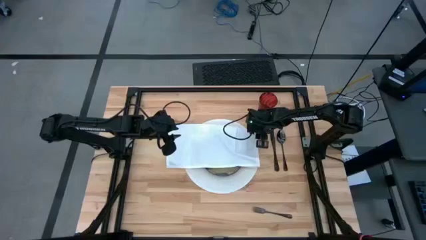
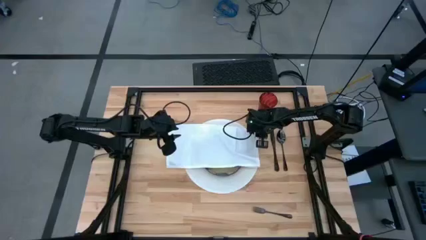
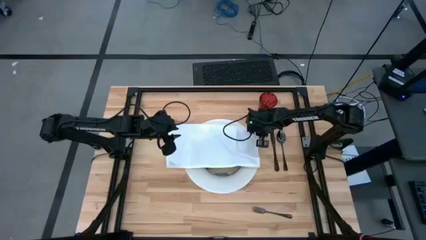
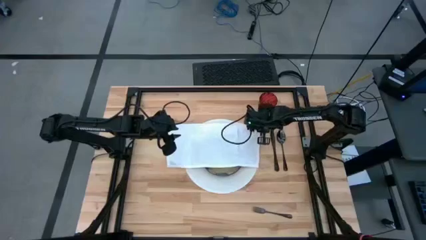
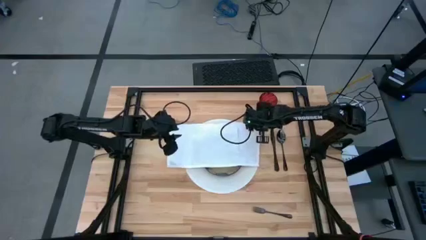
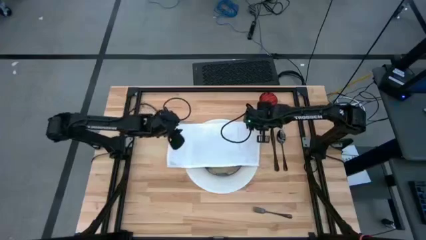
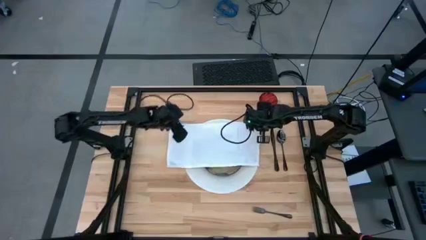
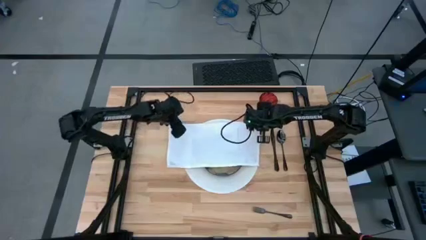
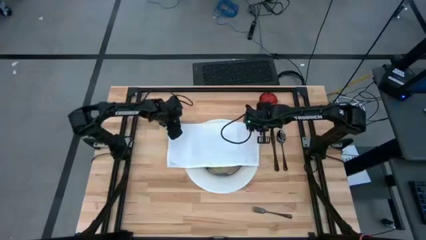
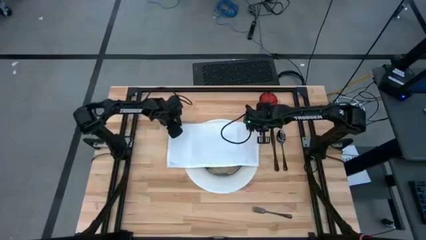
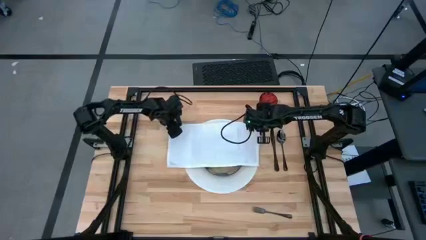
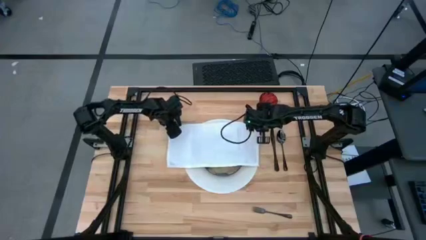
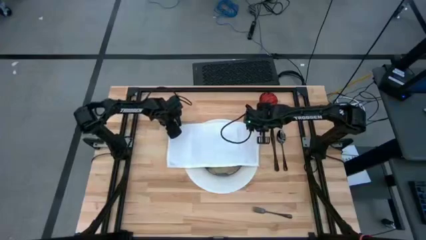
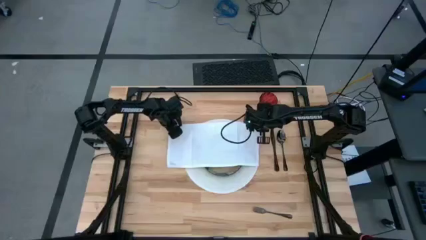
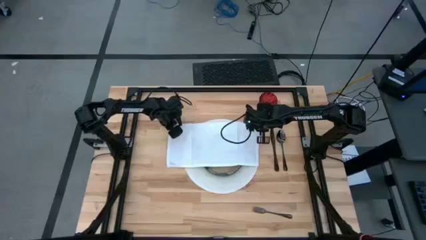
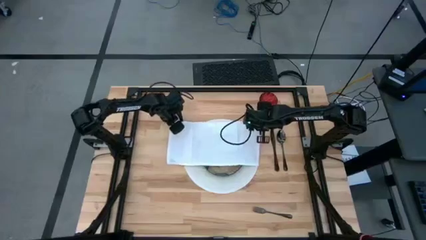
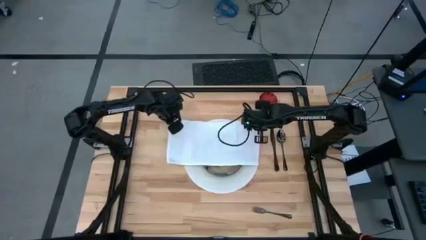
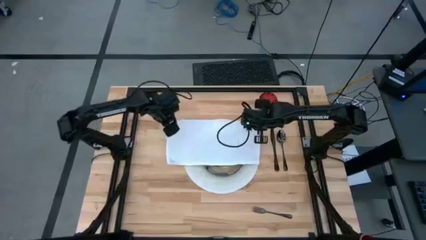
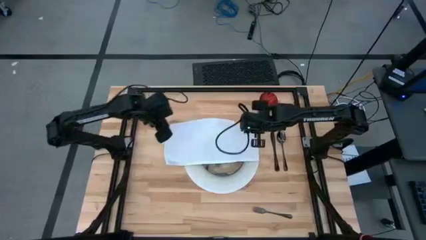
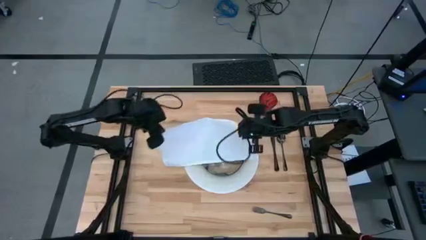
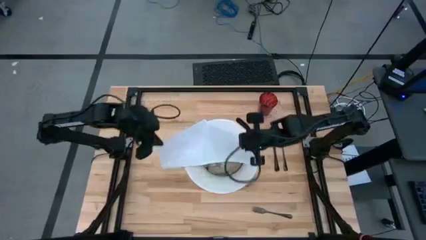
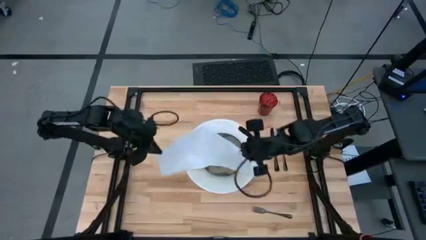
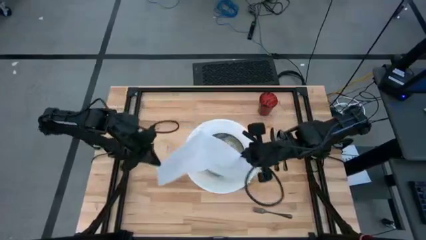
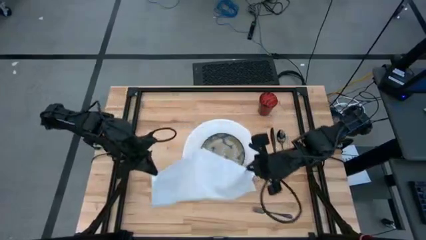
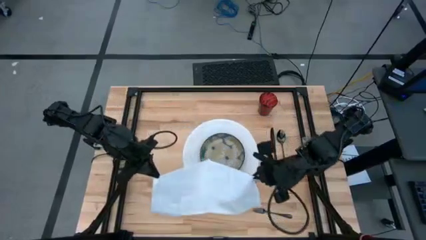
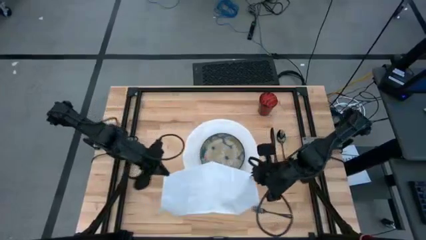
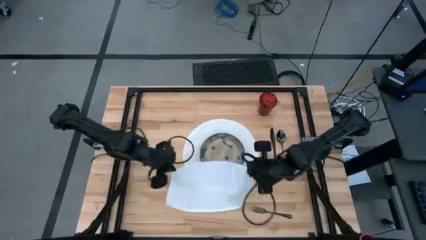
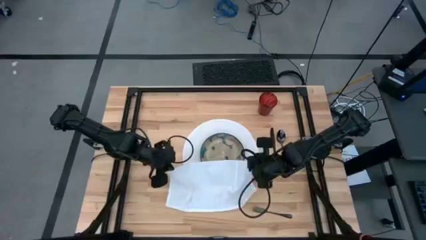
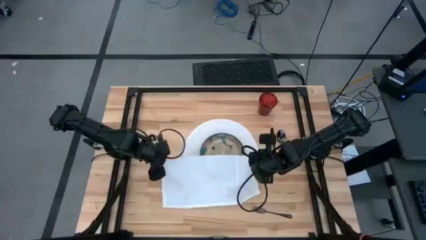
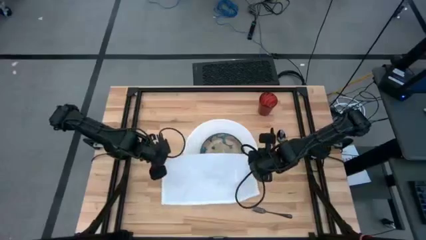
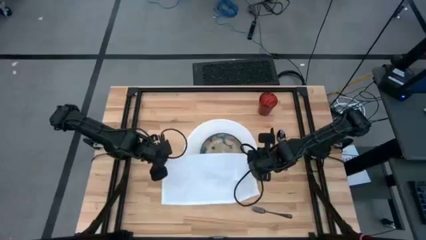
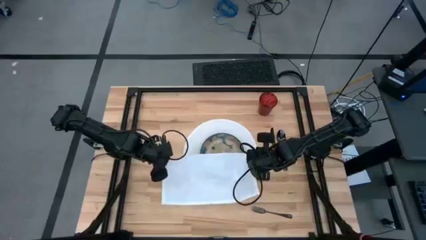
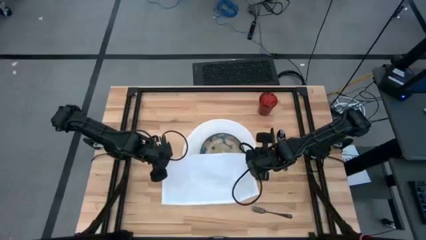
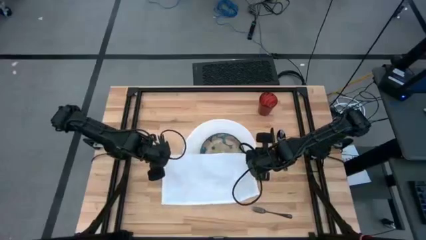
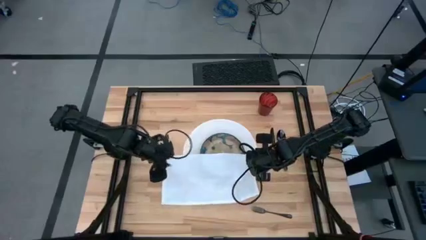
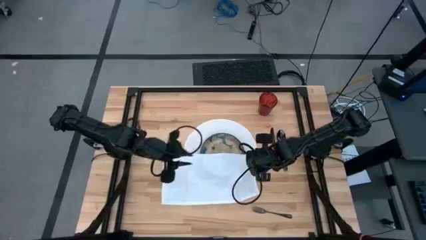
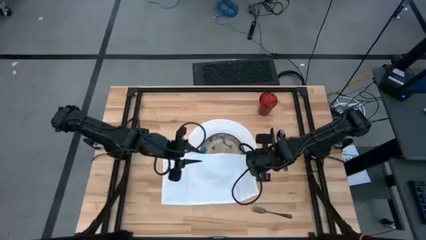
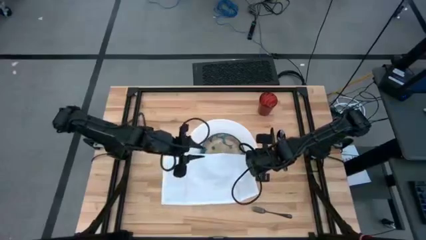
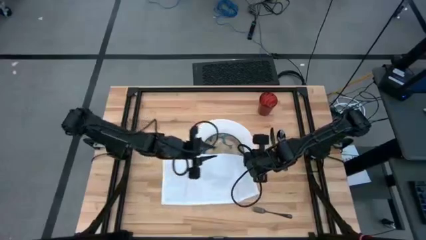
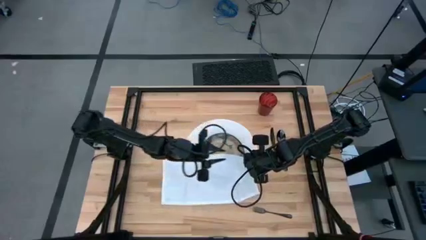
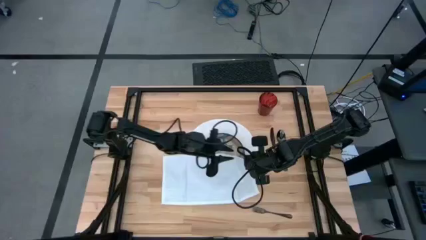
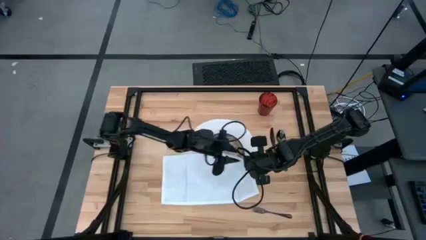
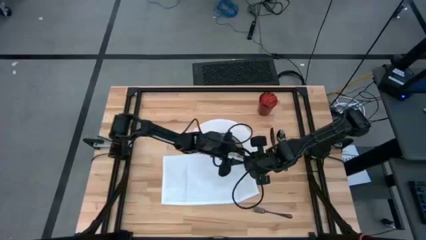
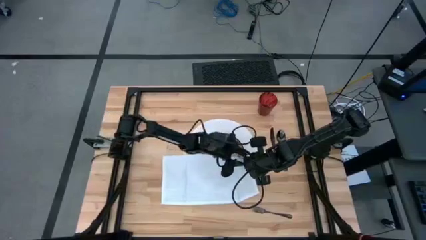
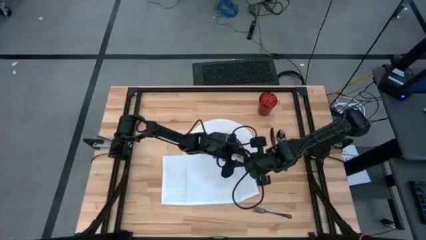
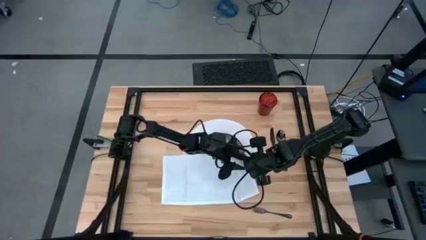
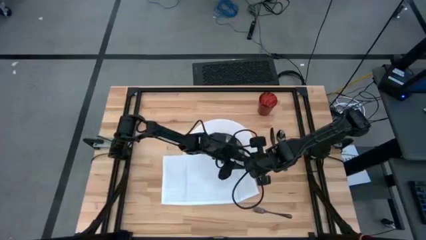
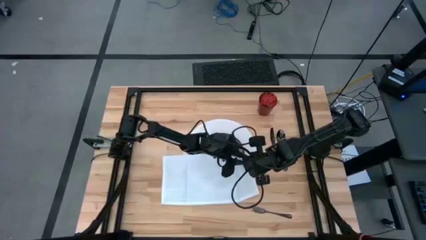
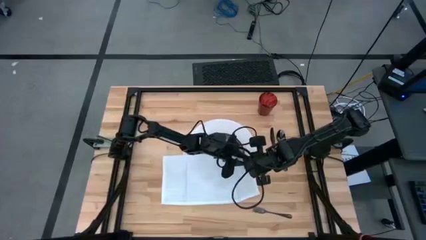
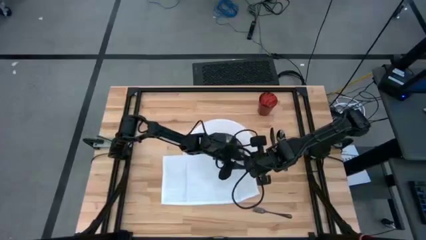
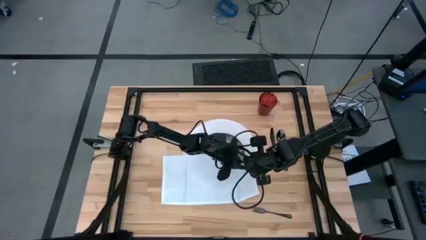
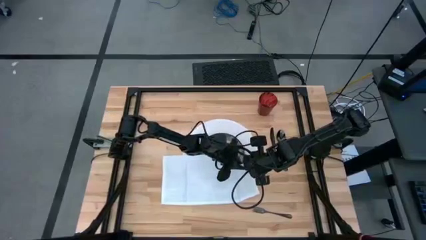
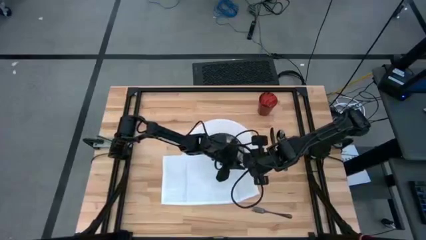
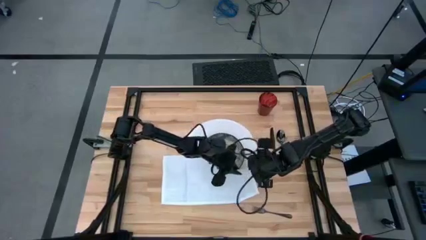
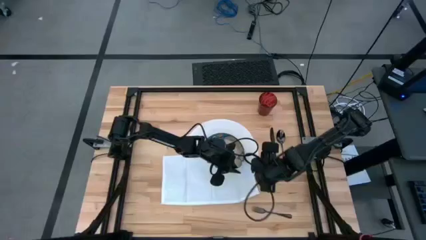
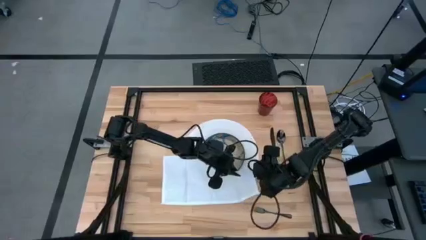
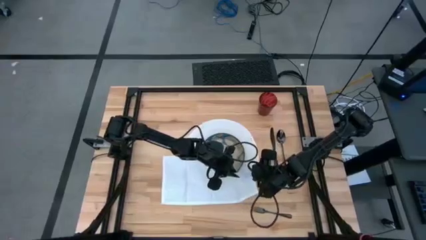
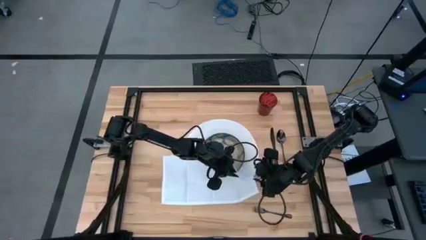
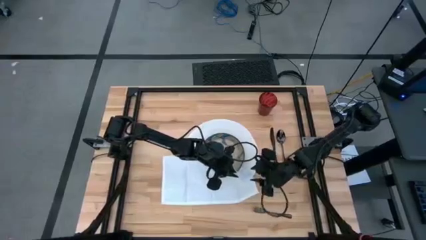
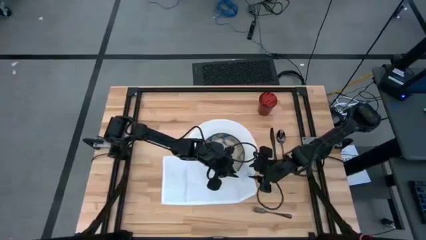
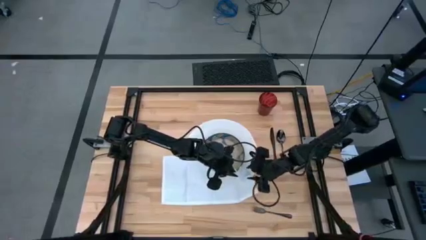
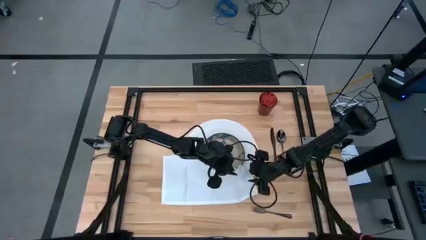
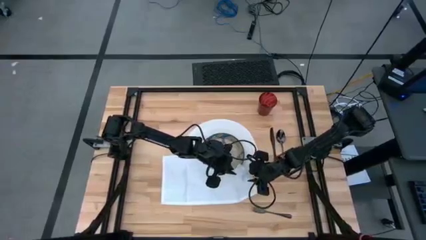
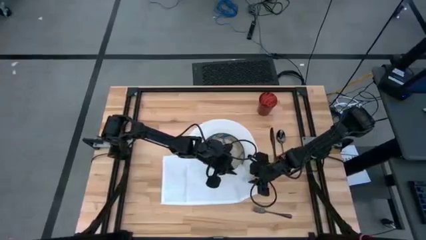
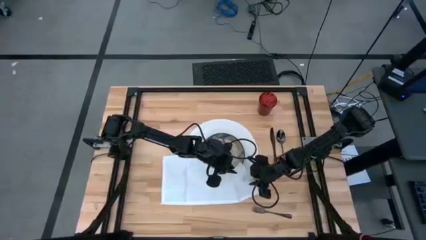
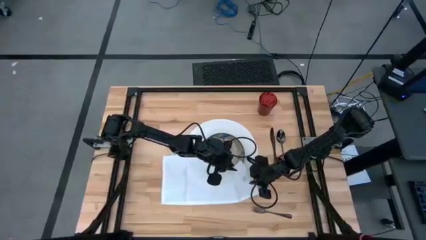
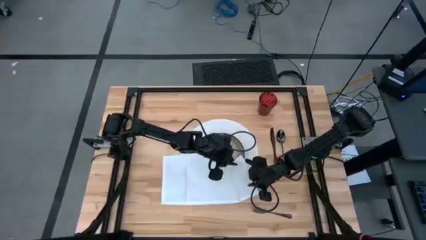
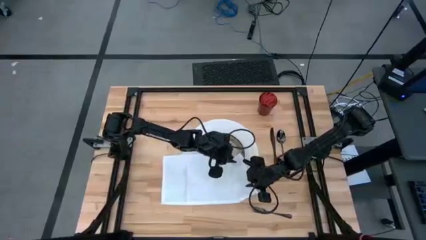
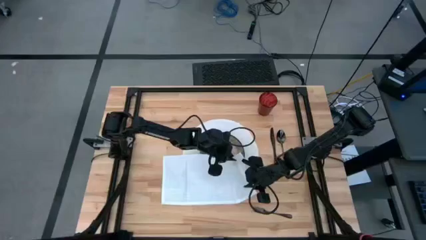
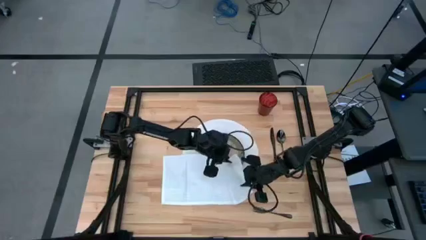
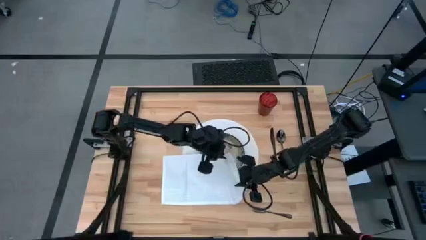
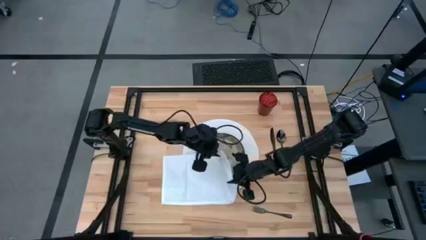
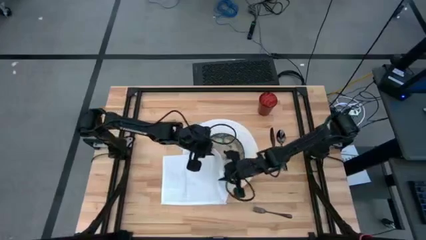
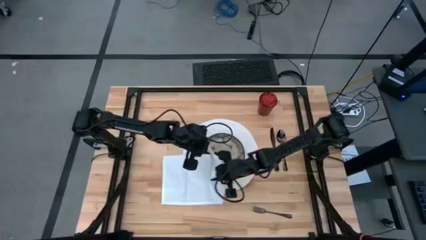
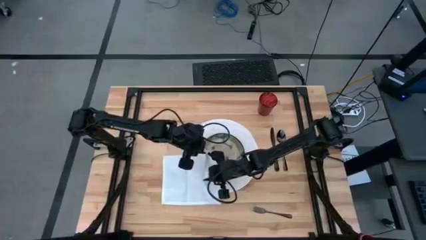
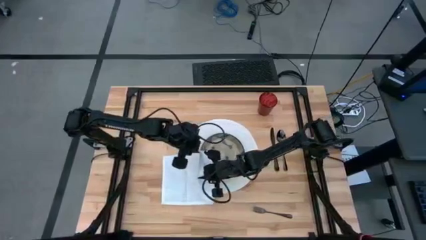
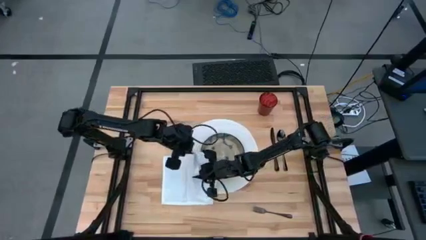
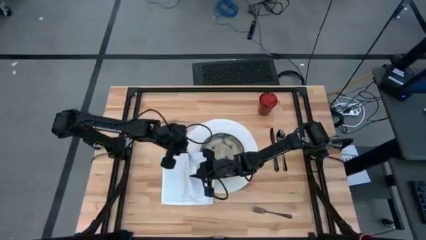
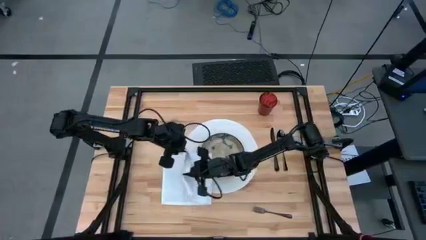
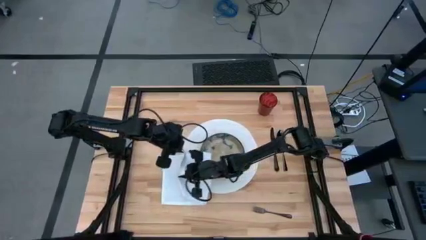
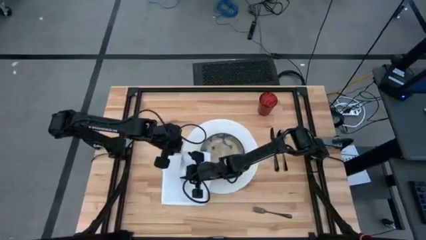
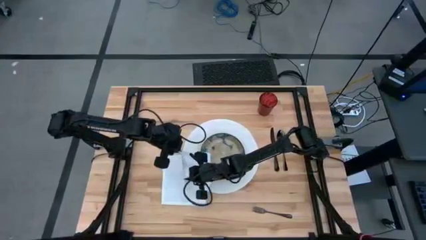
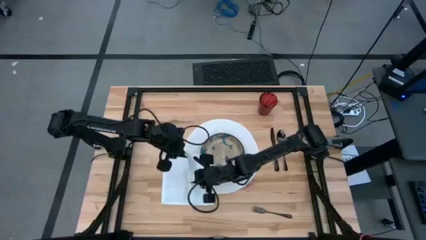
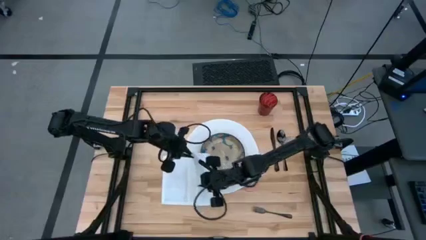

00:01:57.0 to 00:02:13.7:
Task: Set table place
Fold the white table napkin
